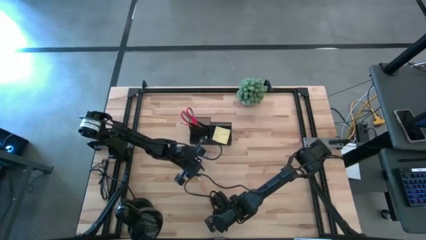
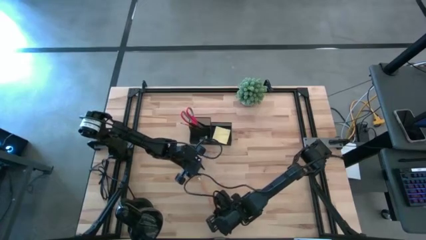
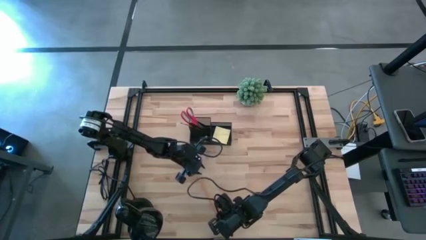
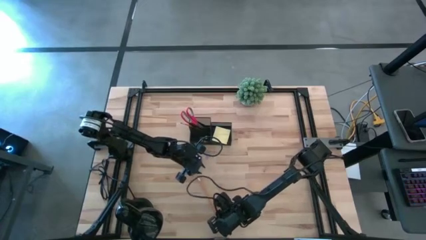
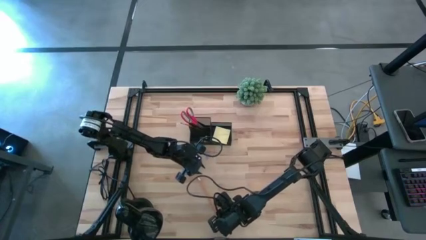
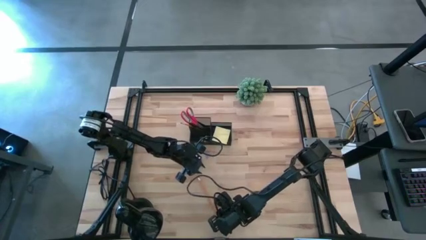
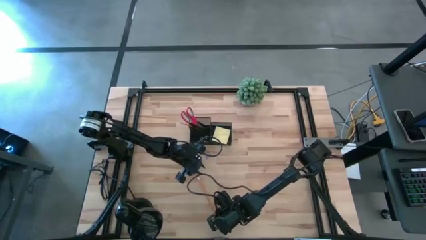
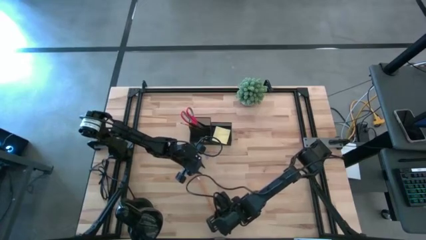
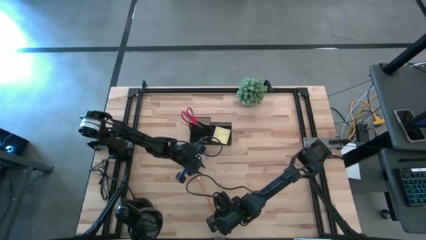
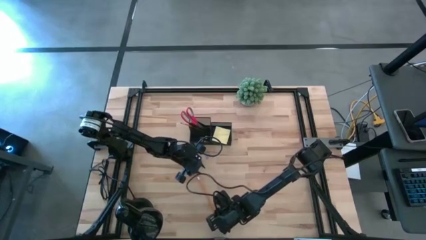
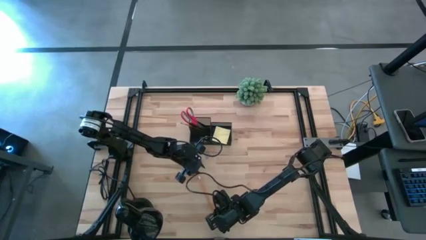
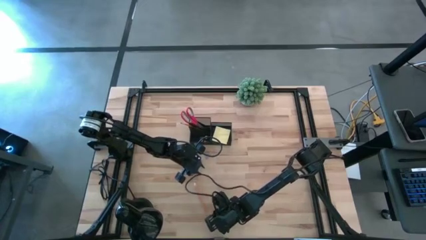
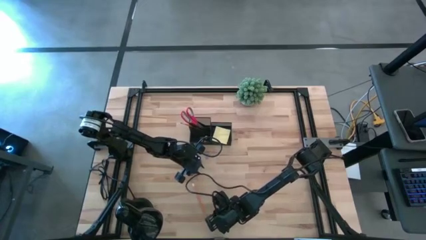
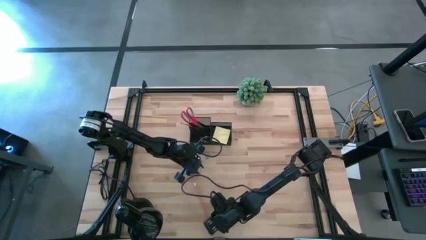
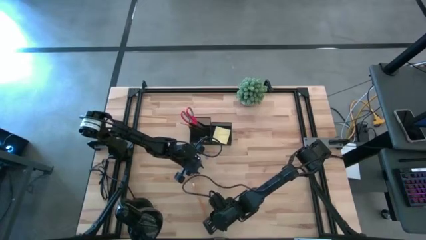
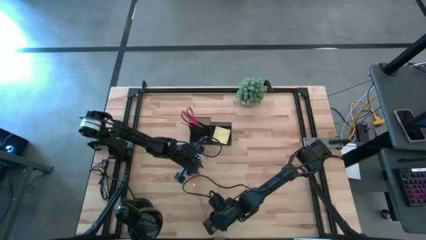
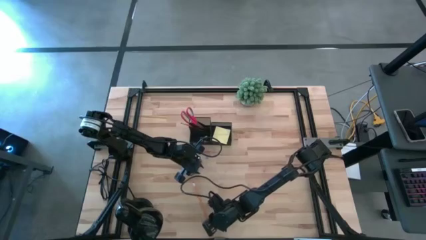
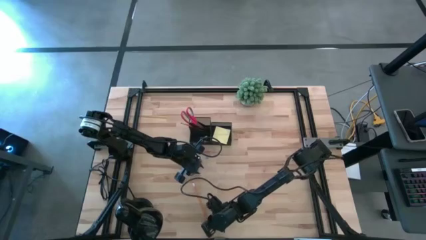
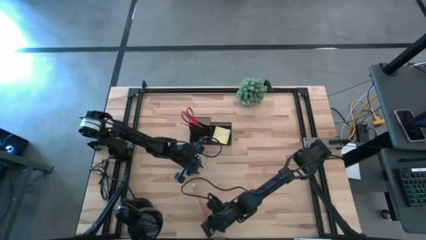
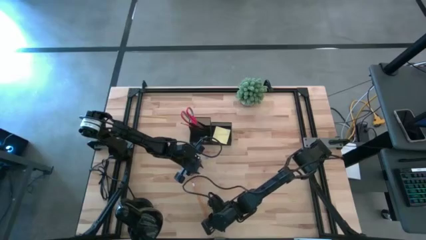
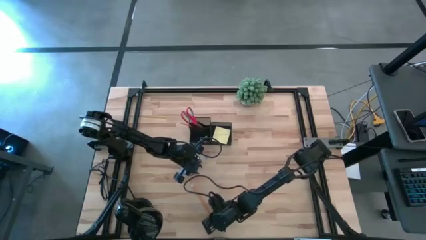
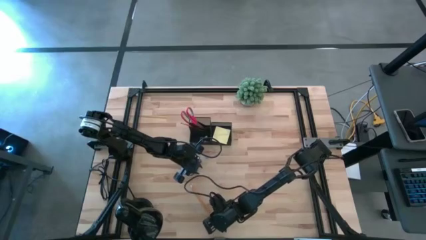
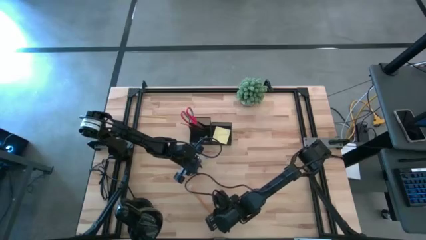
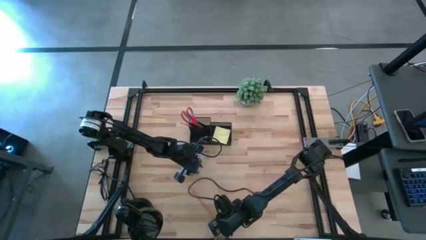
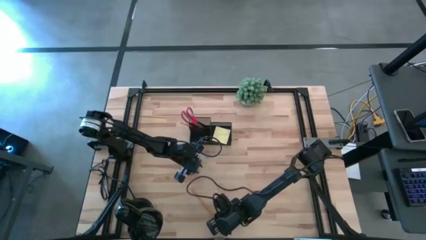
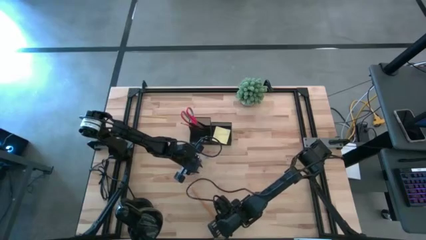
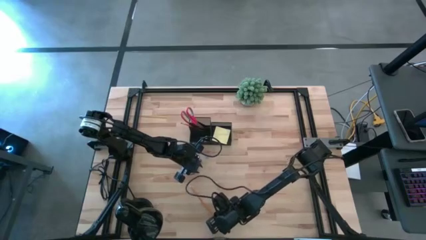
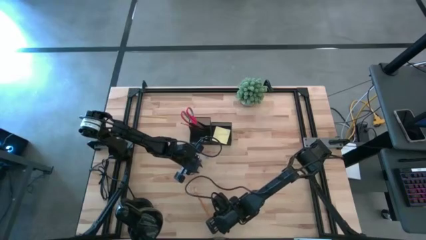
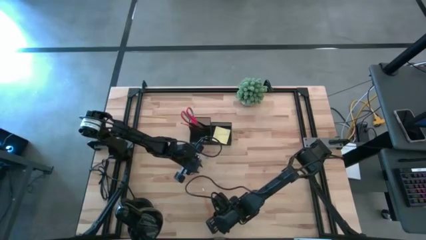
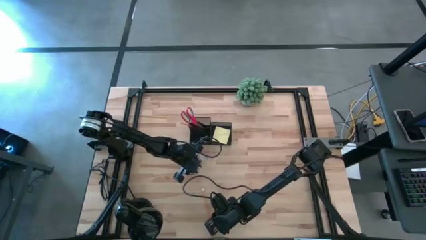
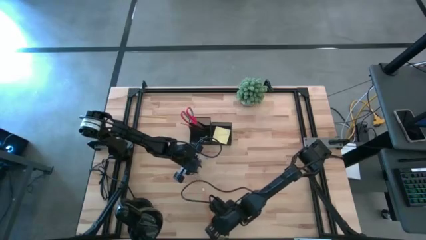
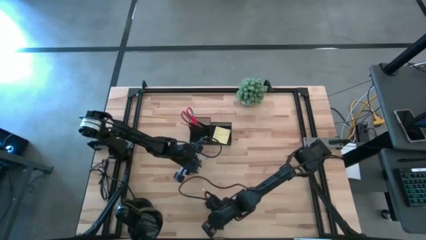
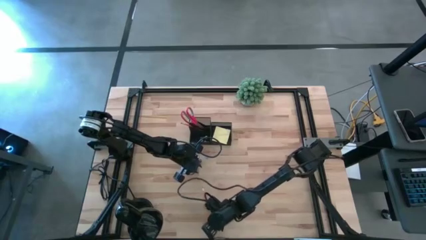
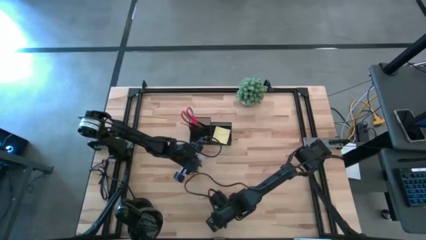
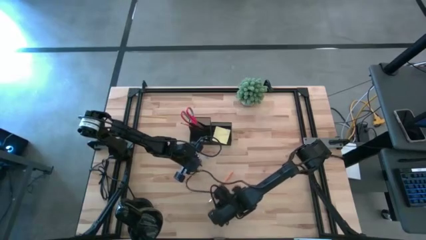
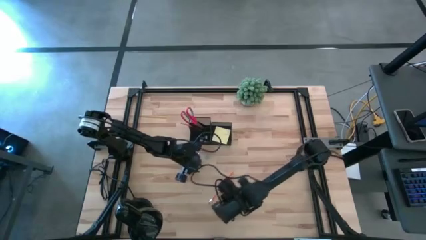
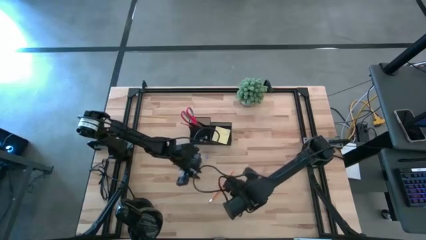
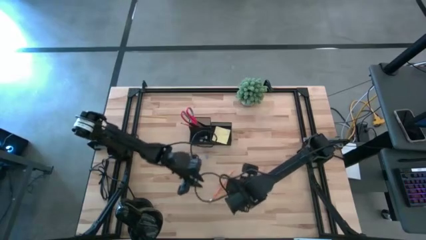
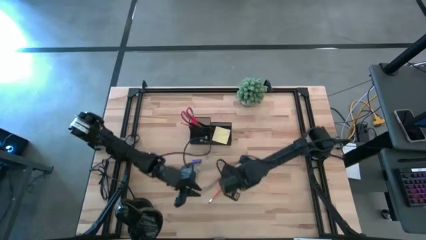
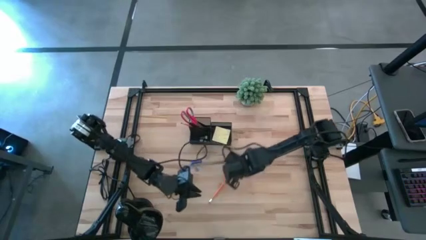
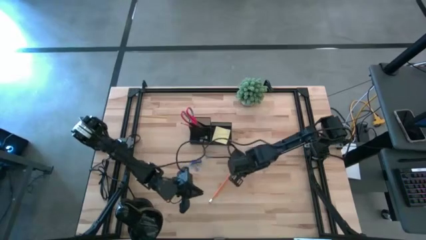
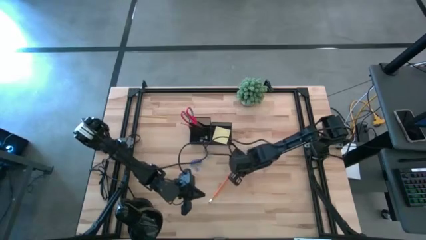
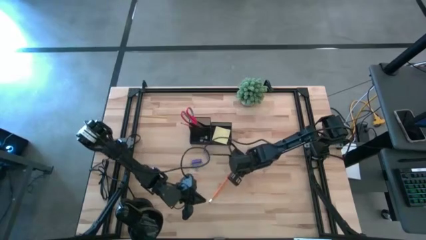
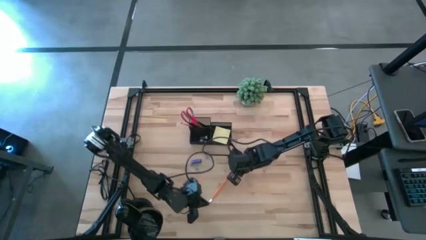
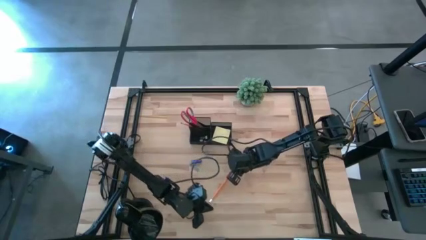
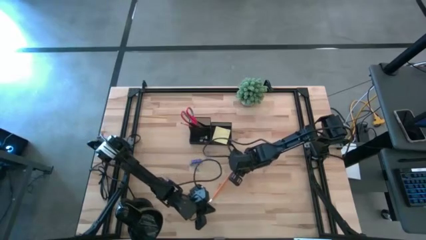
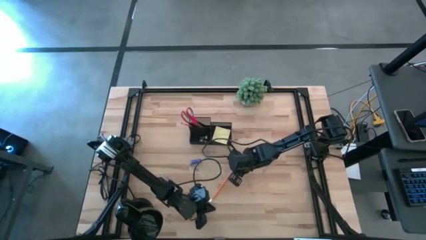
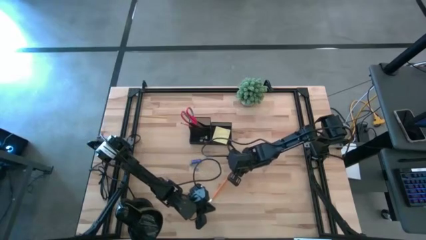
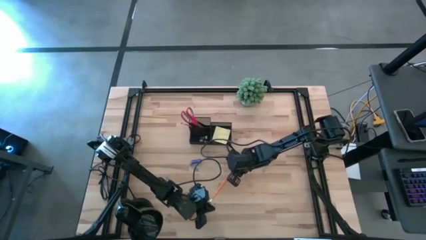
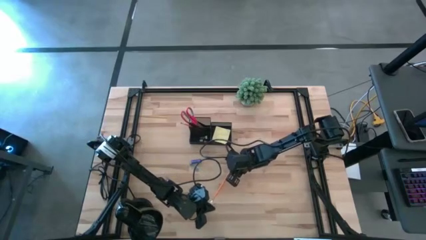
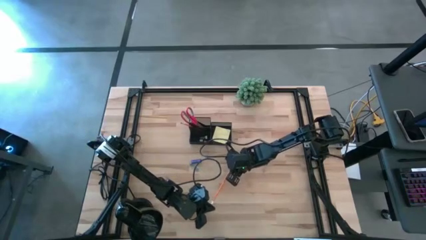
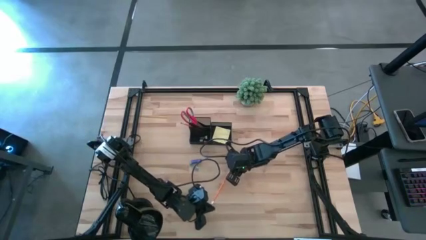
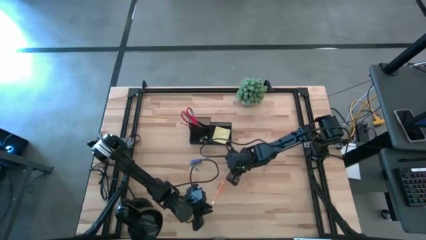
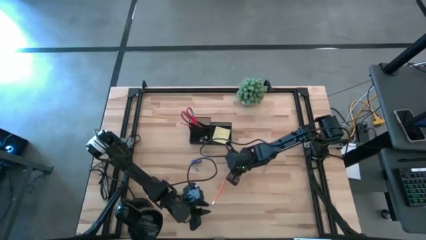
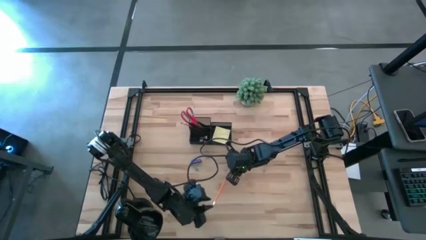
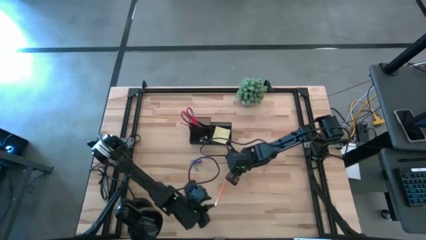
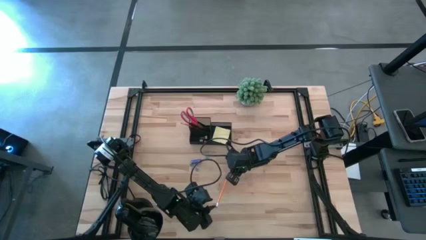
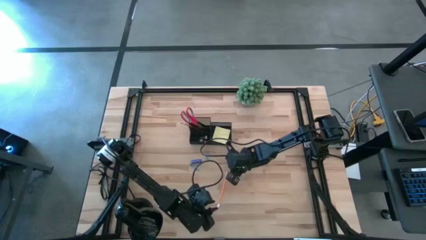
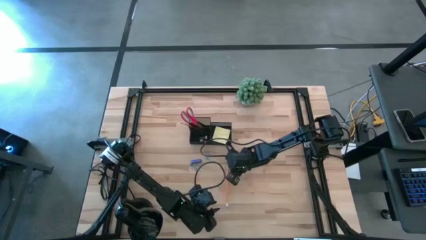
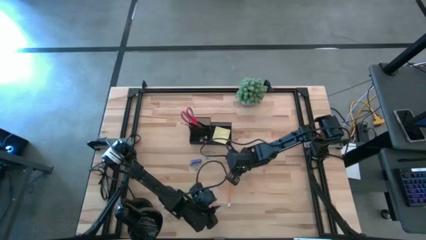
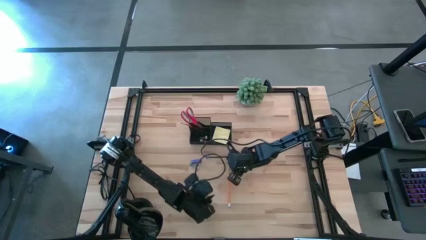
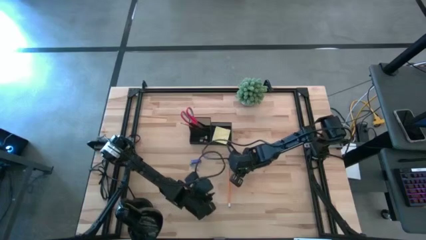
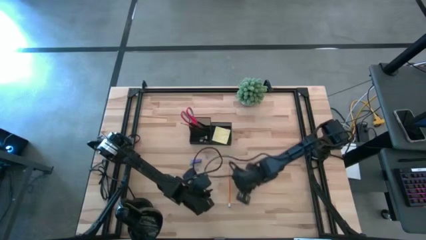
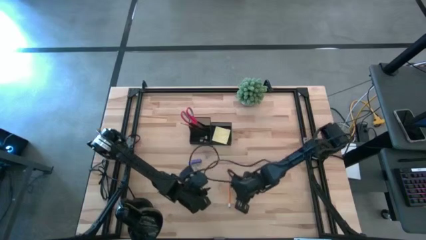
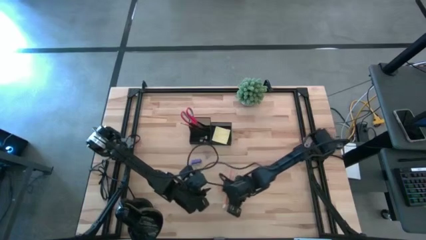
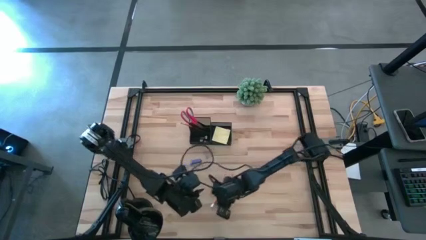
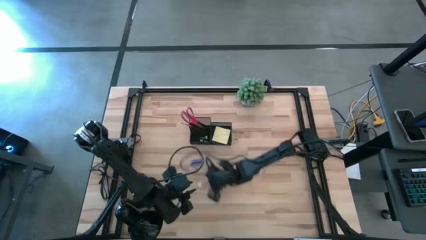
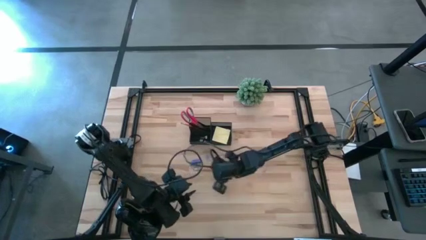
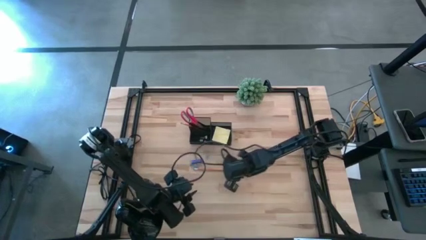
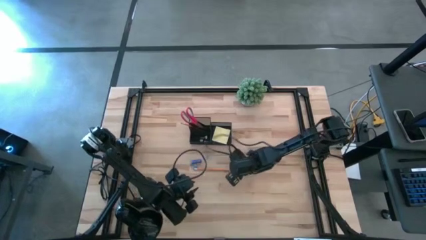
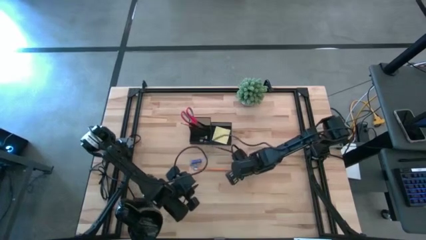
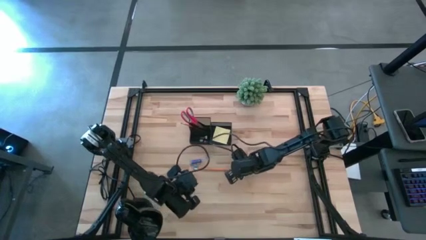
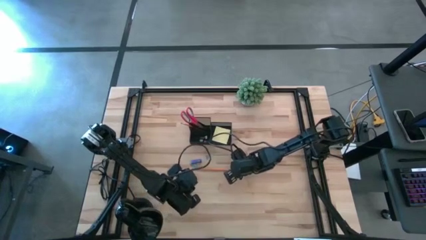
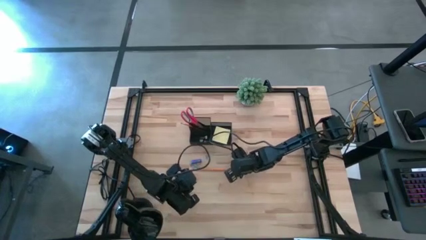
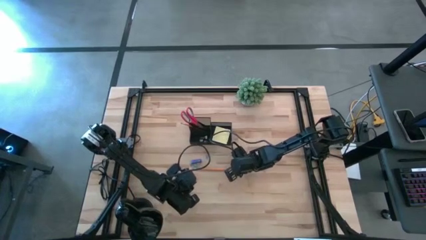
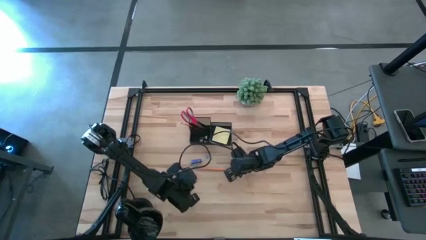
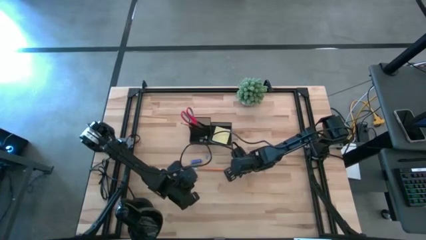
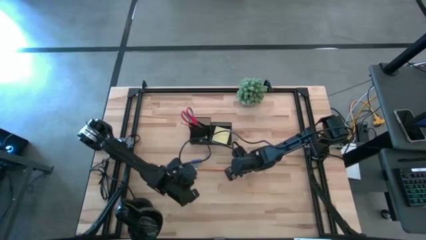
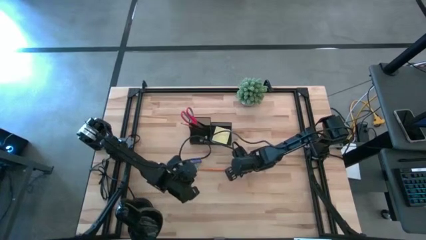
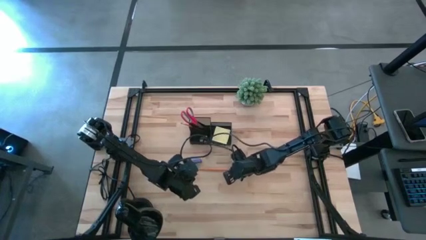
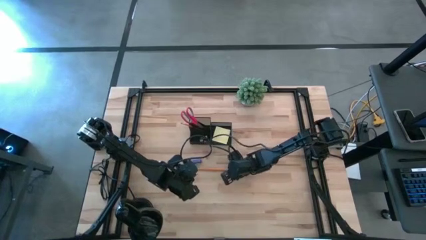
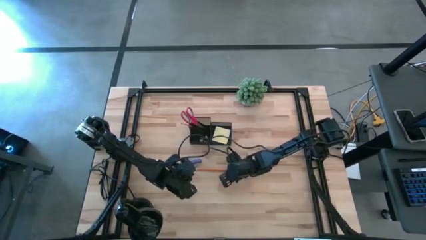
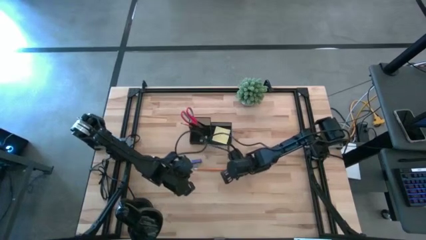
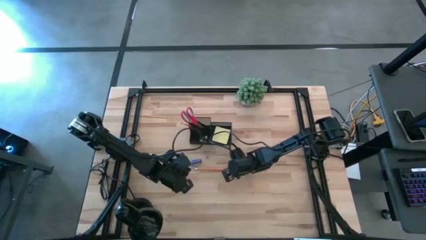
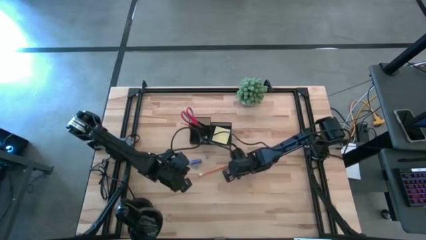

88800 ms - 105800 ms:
Task: Pick and place office supplies into organizer
Put the orange pencil into the desk organizer
